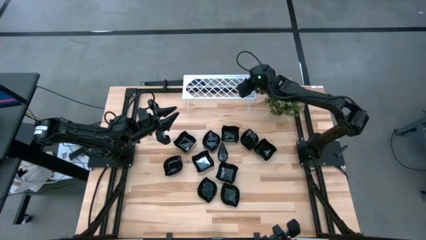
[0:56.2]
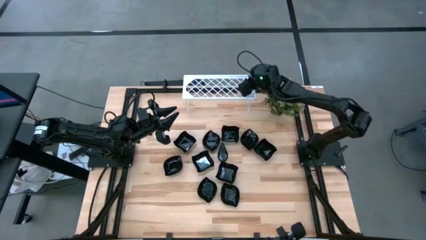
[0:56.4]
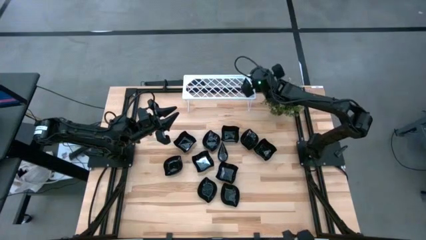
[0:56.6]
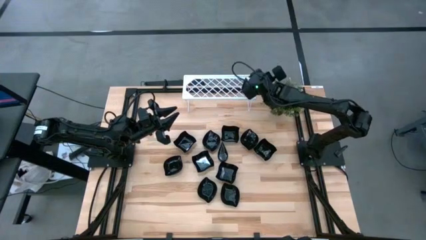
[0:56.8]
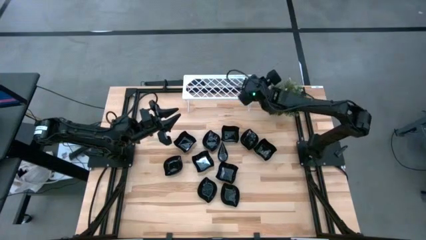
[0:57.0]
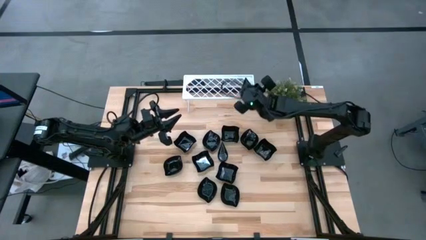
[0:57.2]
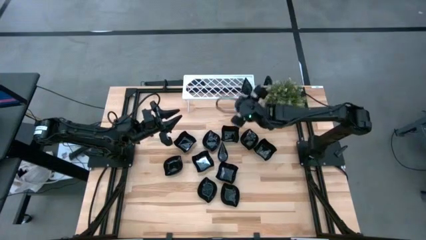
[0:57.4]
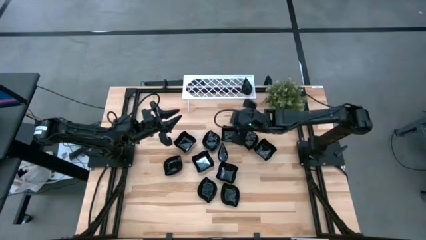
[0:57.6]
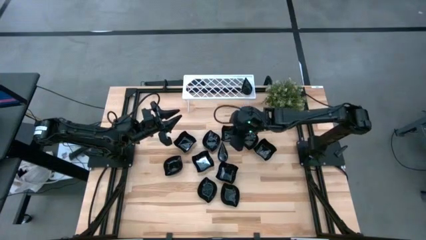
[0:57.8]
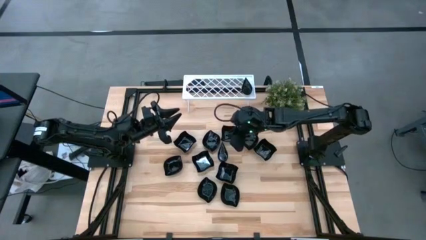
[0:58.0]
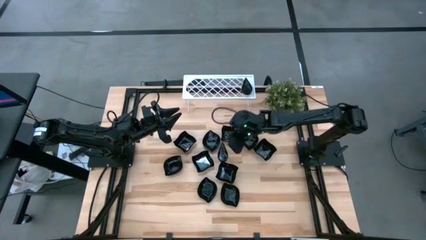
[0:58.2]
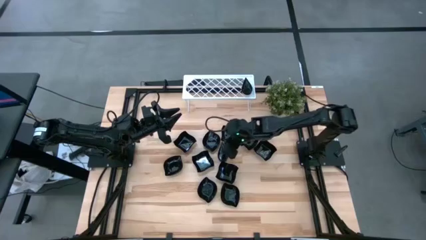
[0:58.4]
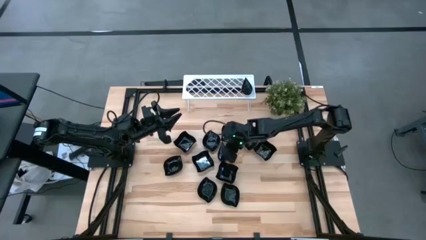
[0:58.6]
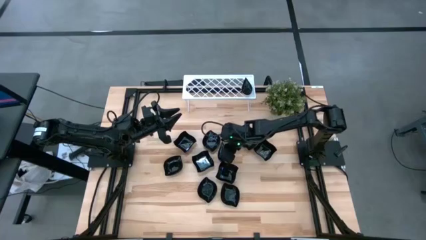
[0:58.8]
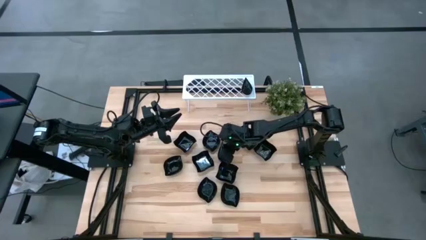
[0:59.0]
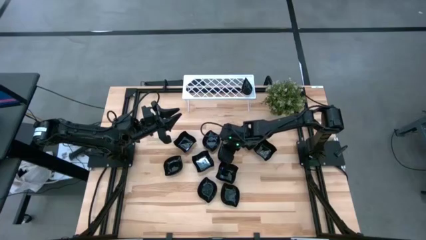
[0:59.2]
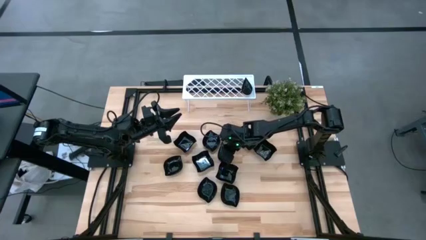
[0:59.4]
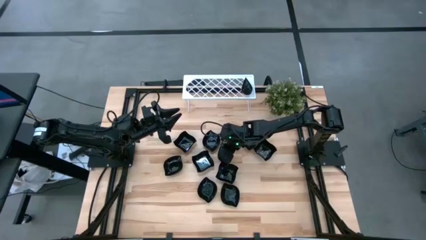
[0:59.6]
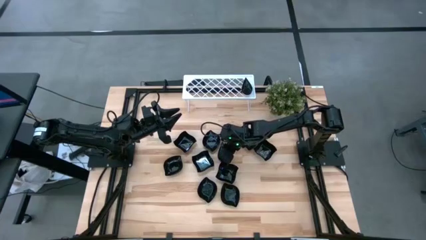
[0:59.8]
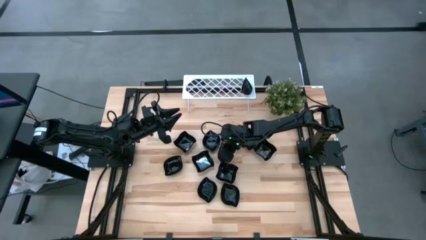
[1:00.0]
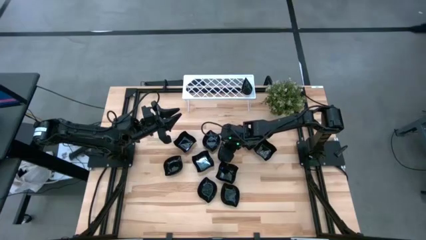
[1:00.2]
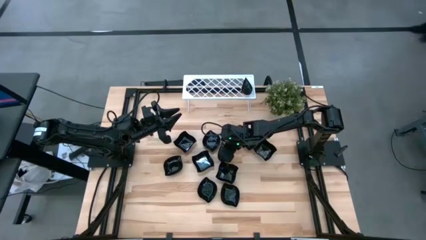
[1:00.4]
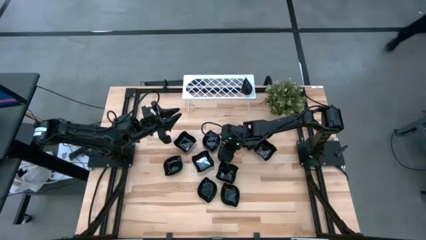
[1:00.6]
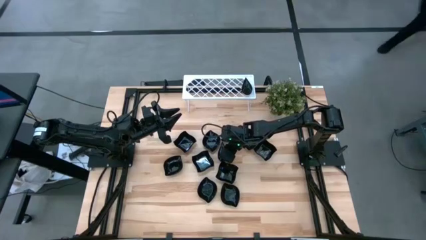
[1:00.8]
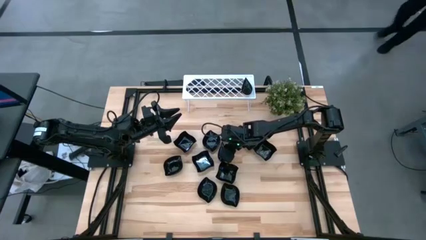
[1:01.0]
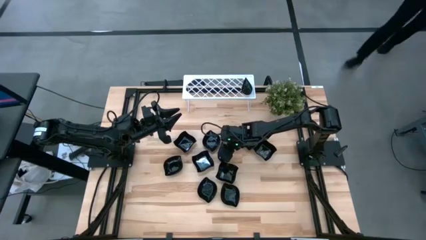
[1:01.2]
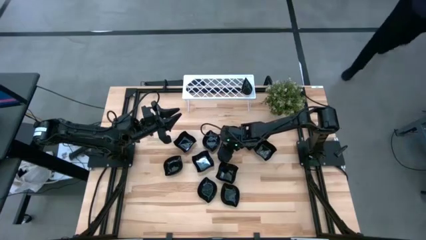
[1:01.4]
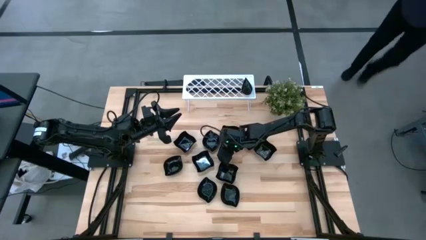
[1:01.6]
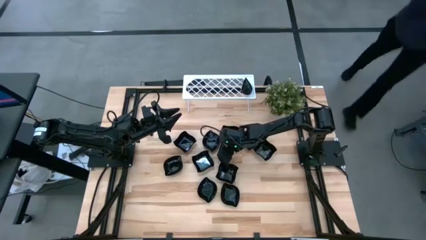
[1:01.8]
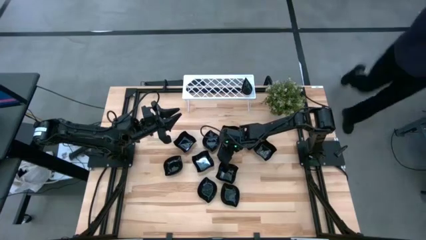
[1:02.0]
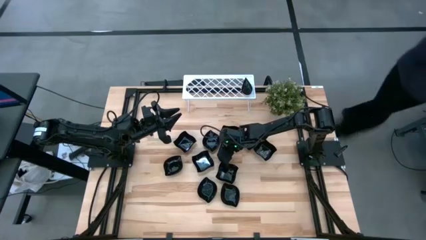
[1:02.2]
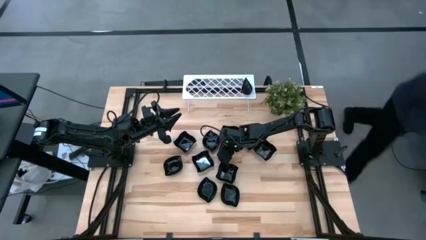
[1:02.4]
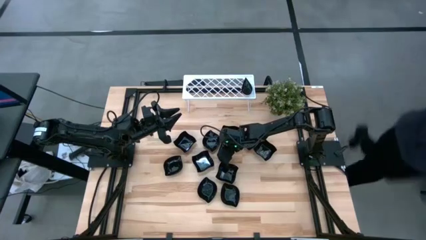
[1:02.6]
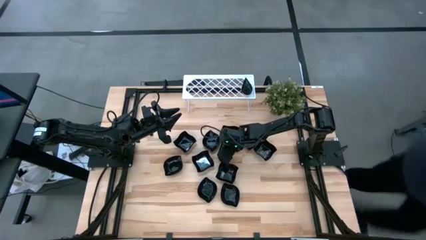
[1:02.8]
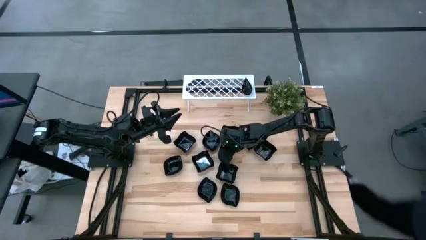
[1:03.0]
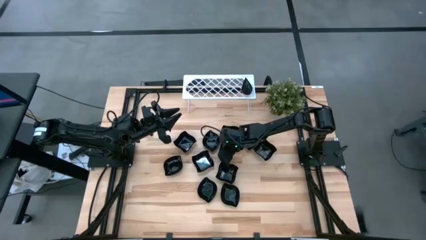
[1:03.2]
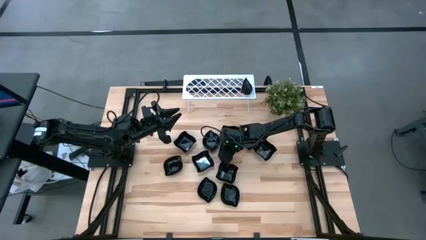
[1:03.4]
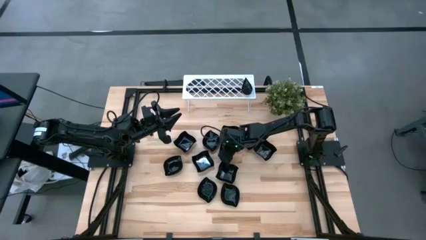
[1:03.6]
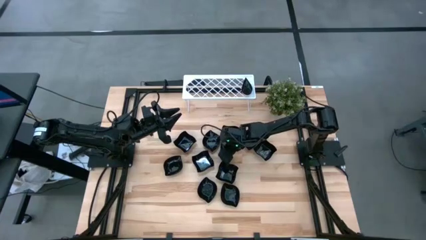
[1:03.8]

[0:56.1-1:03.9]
Task: Pick & Place Mini shaped plates
Stack the drop shaped plate on top of the drop shaped plate on the shelf

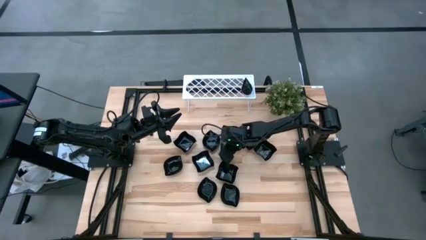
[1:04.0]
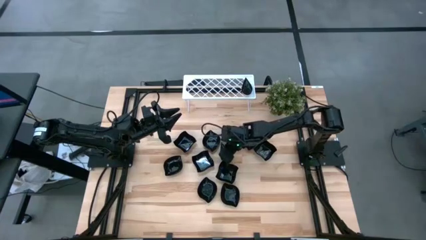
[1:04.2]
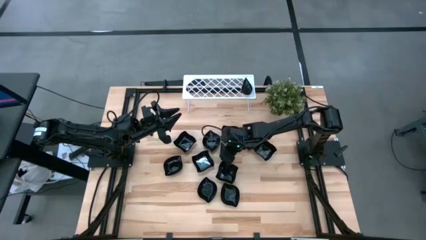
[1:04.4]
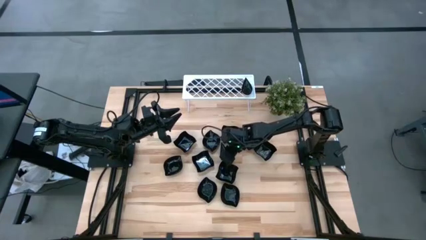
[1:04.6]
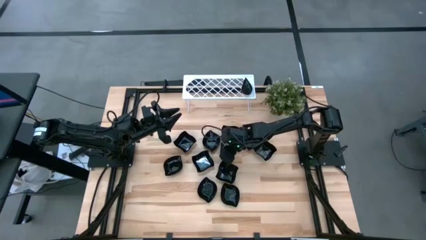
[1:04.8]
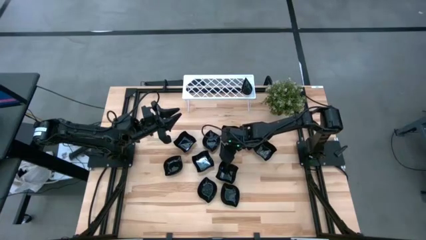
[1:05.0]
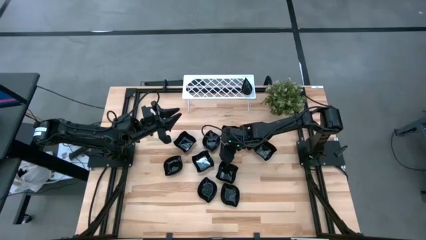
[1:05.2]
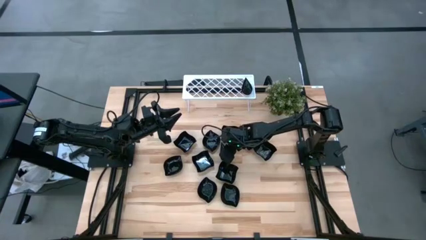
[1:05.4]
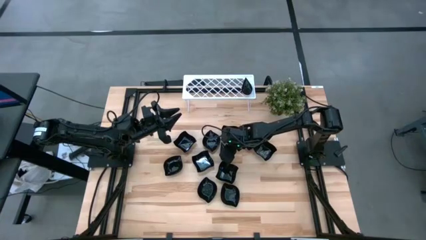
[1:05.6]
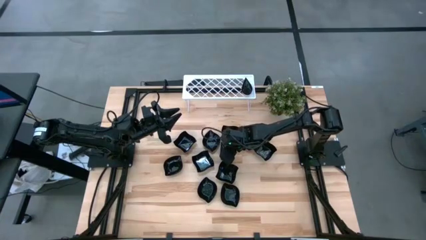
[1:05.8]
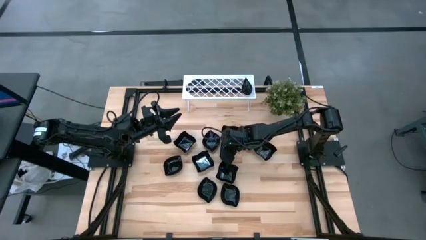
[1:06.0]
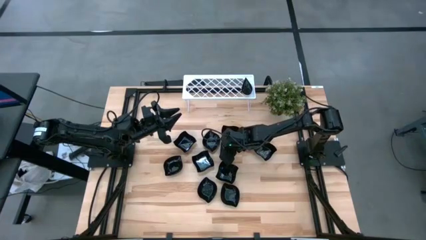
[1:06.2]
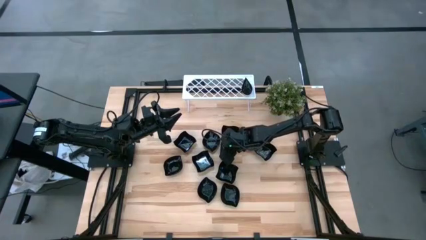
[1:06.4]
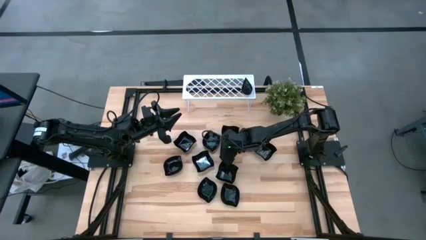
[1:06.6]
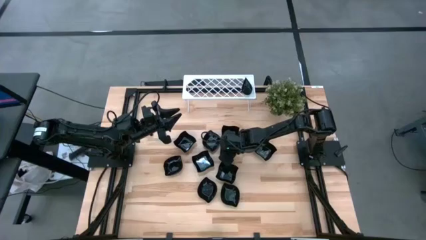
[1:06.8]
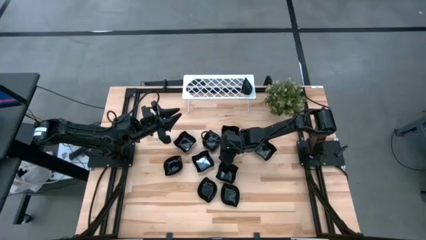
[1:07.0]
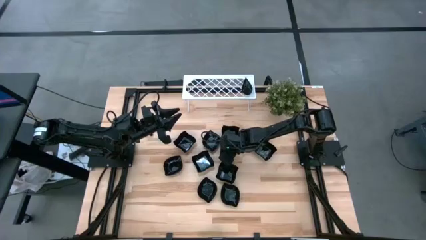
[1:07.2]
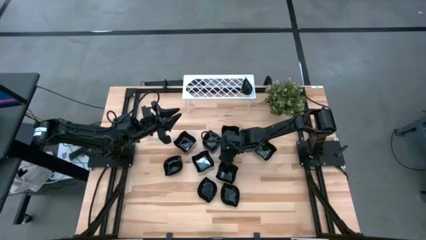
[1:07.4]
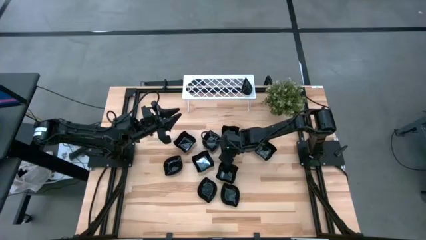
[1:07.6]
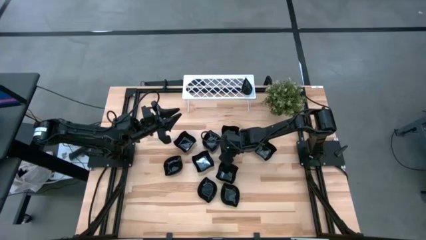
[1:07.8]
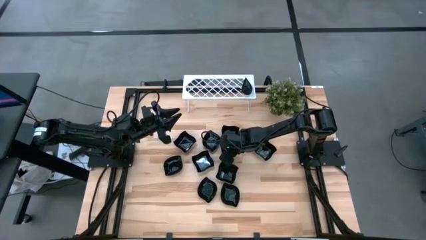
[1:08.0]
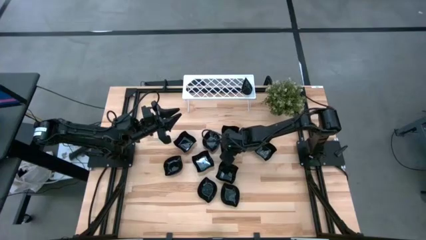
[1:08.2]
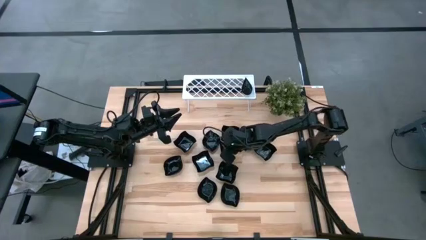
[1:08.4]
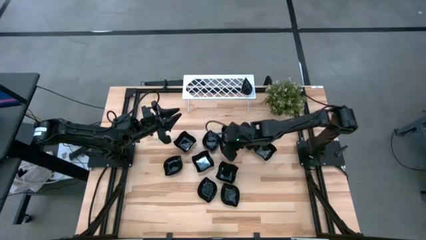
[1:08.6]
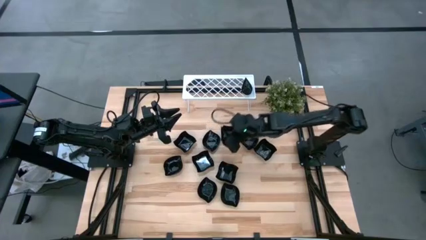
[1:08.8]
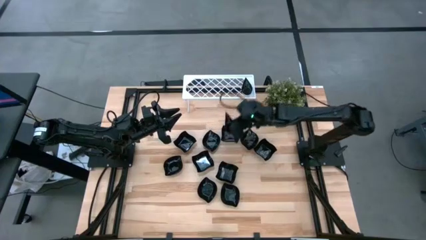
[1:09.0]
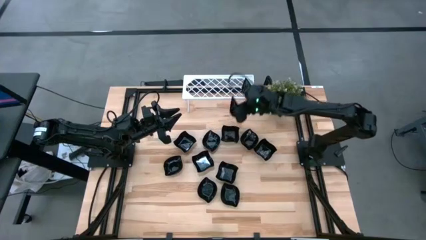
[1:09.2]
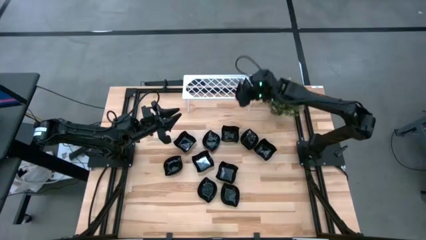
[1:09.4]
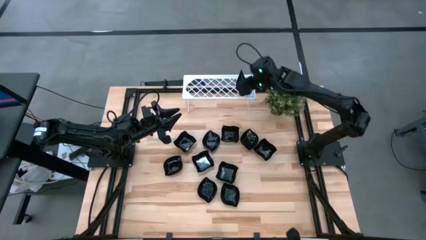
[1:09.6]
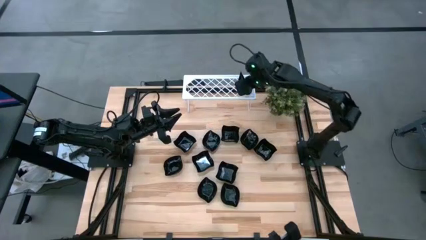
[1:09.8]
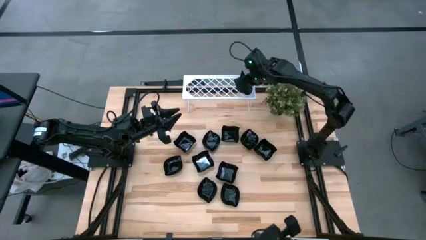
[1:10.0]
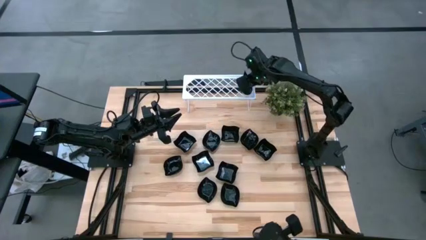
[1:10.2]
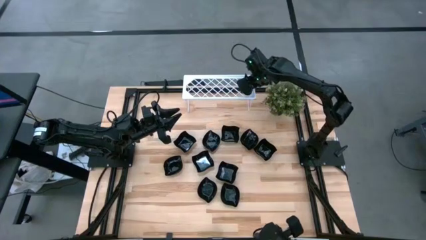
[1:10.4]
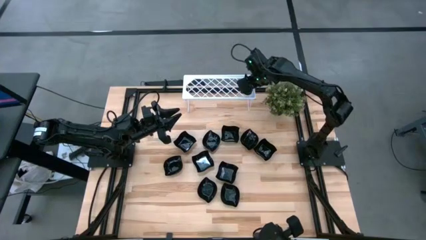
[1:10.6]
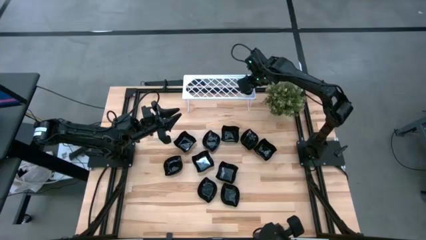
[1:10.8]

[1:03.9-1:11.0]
Stack the drop shaped plate on top of the drop shaped plate on the shelf

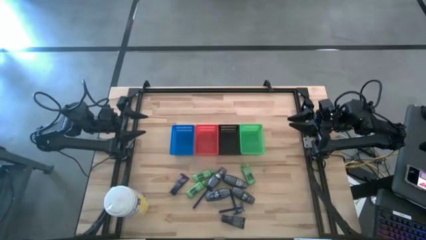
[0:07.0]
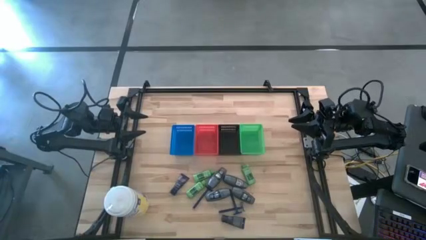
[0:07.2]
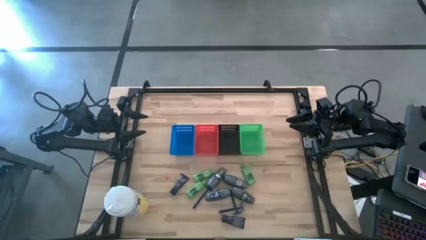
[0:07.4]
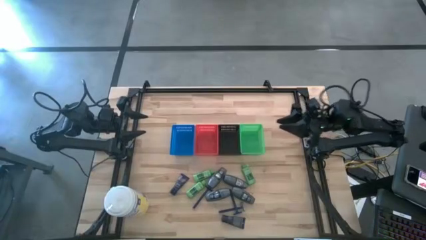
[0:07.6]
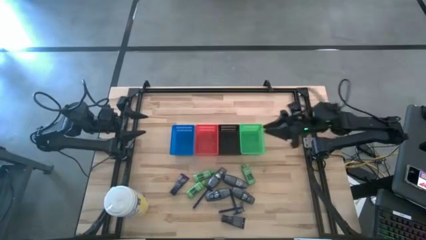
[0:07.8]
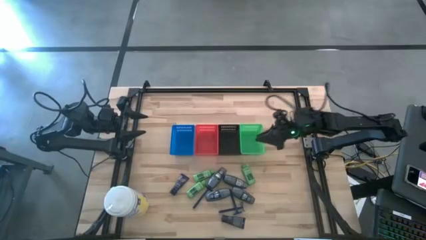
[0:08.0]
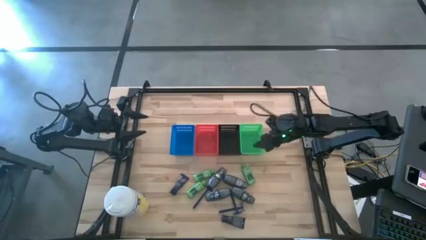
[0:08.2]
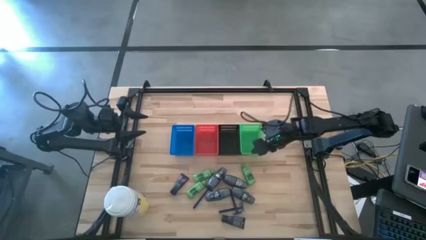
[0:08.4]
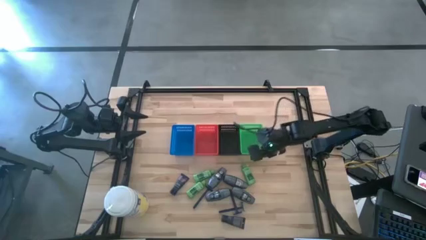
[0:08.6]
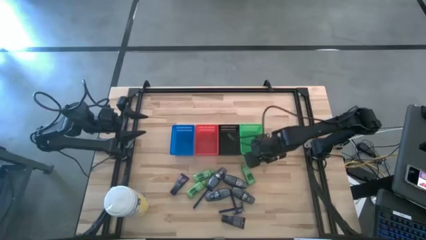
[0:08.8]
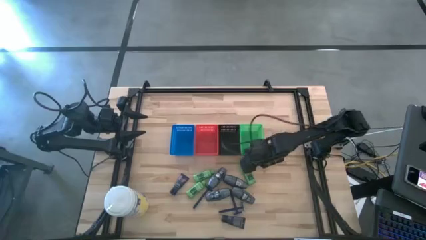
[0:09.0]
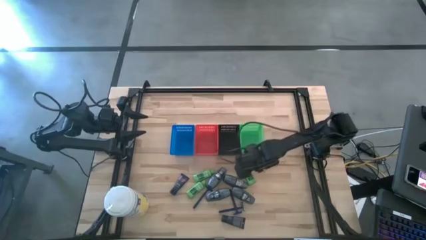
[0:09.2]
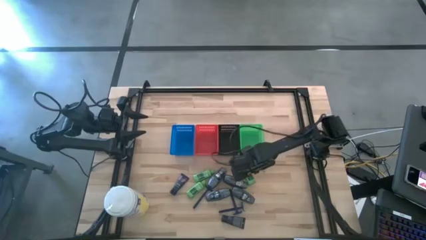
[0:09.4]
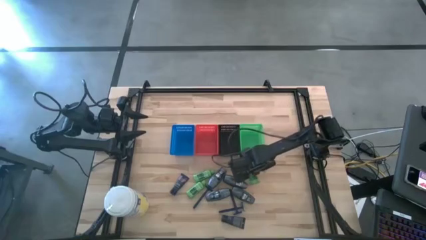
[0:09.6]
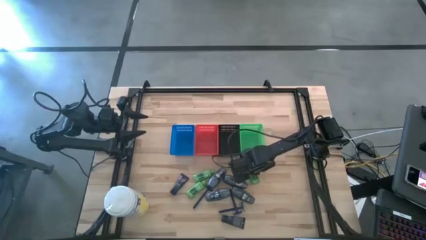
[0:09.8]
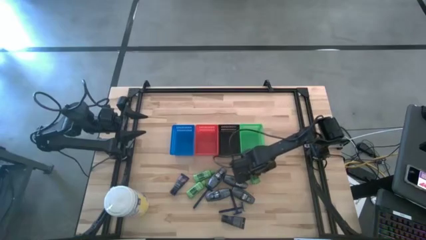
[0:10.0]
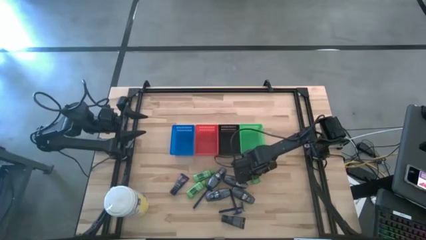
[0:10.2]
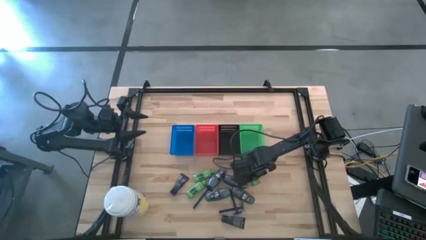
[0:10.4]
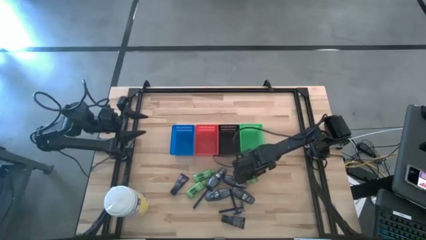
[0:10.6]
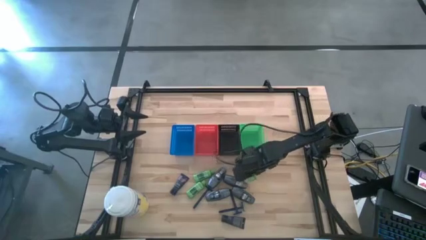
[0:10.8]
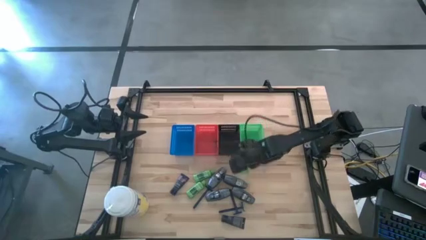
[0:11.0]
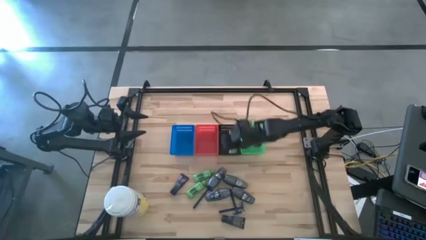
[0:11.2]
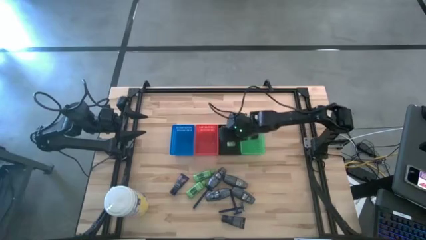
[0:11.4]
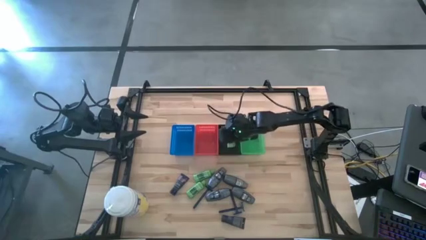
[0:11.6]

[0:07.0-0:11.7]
Task: Pick & Place Travel size toiletries
Put the shampoo into the black bin
